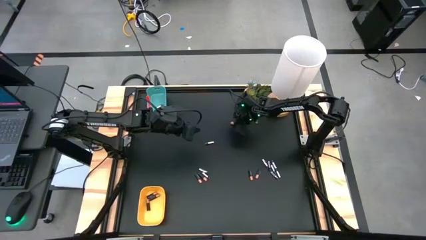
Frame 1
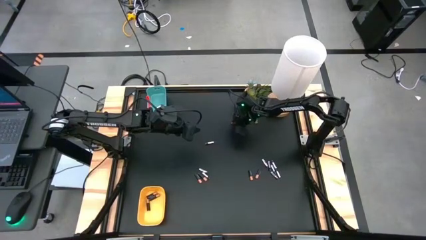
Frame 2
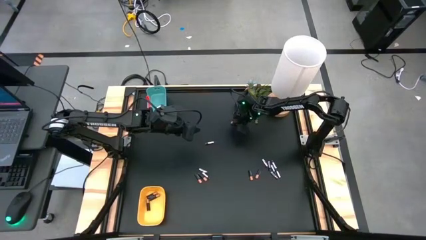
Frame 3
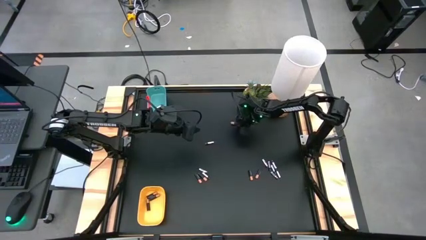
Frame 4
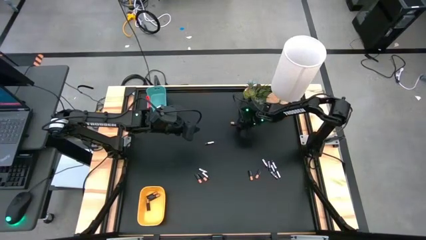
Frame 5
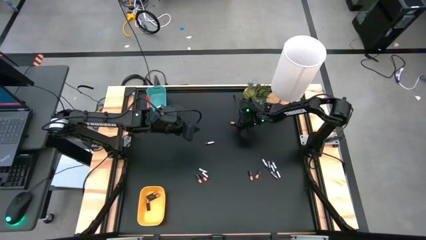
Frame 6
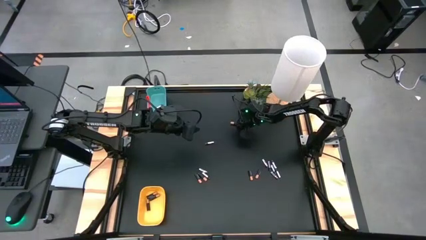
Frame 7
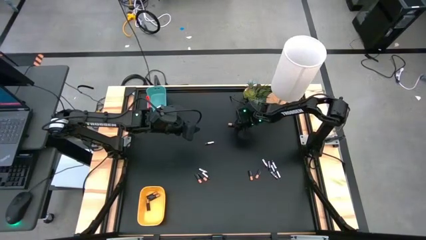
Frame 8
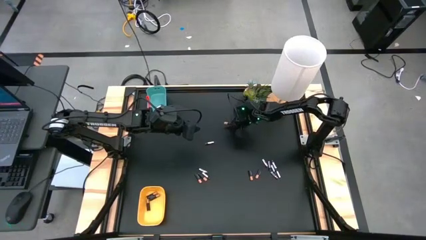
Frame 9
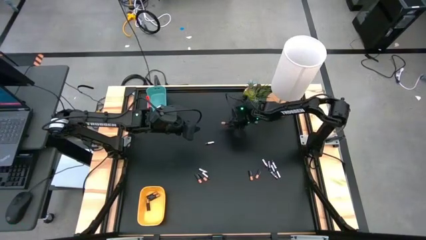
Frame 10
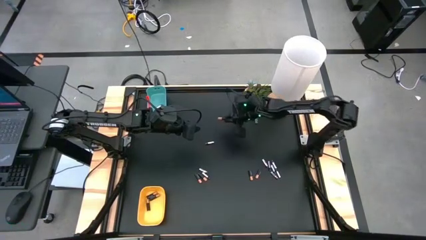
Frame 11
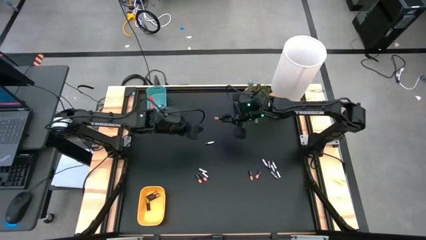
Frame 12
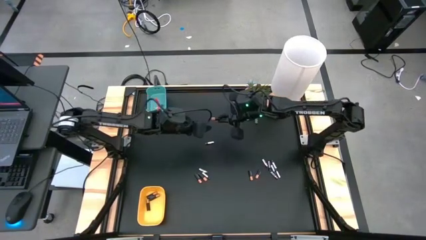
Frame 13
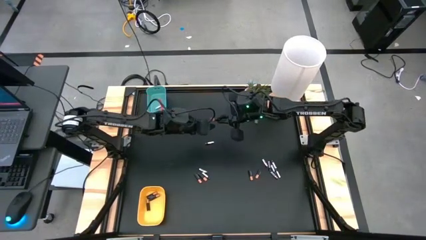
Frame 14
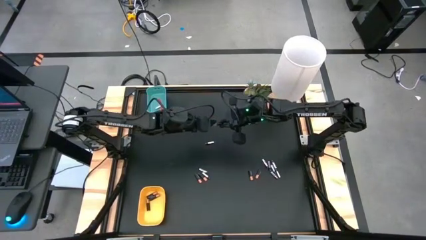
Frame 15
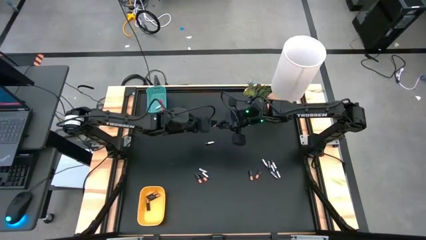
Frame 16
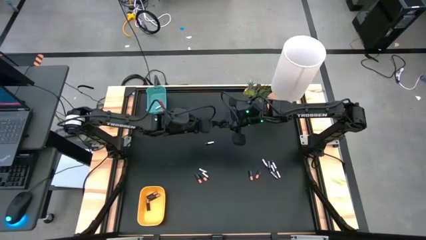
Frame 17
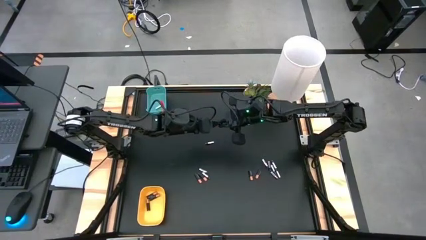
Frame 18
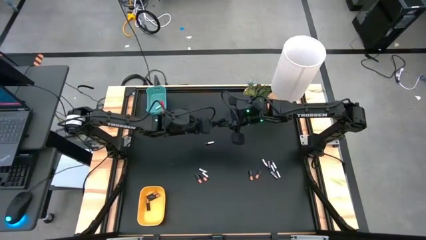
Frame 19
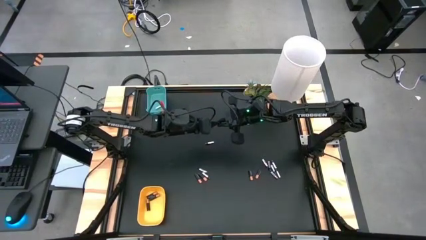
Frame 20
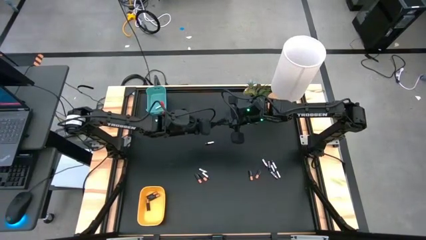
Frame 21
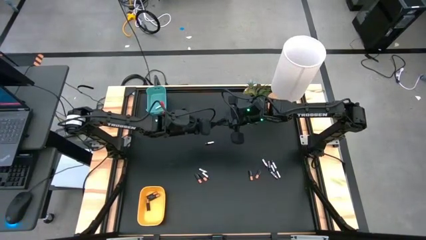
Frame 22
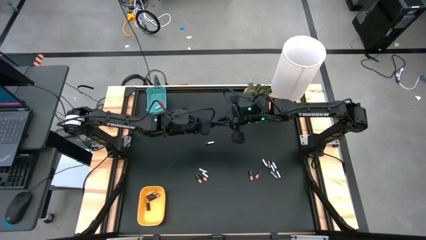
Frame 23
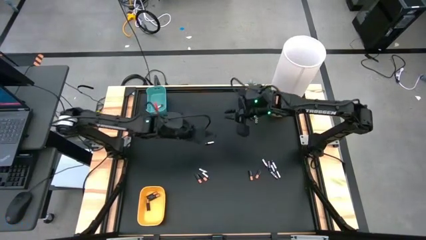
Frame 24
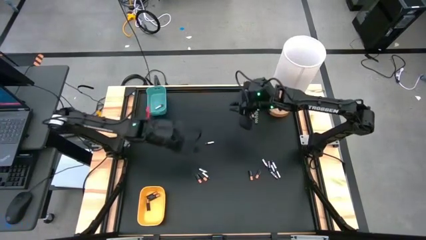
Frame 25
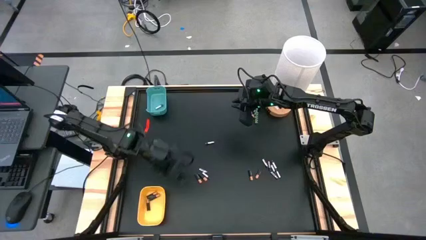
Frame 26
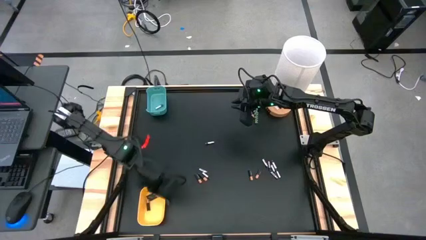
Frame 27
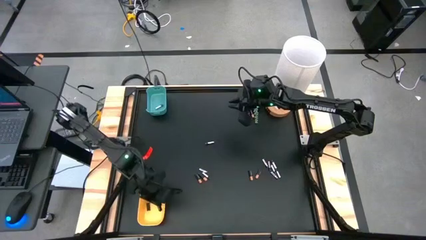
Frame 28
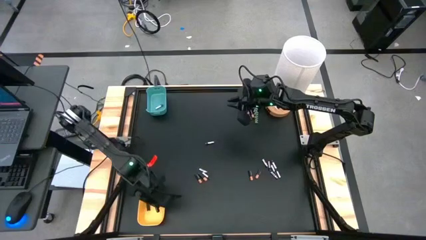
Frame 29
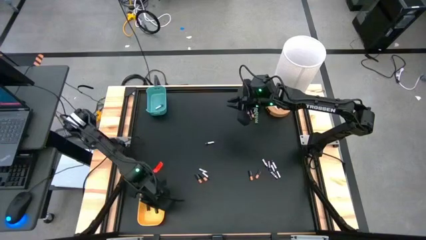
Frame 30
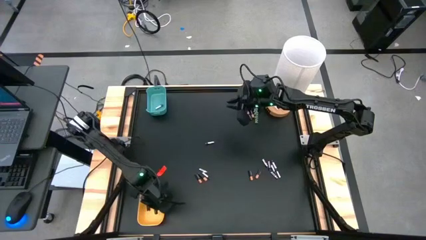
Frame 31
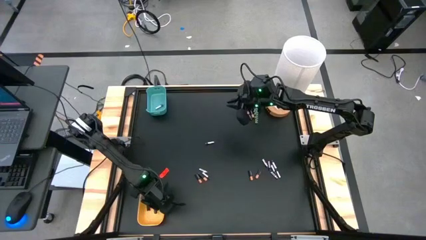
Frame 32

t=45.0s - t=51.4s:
Task: Sort batteries
Put the black battery into the yellow bin

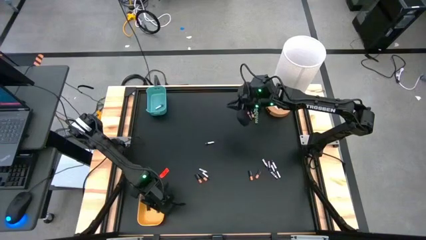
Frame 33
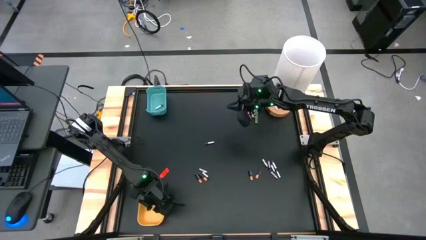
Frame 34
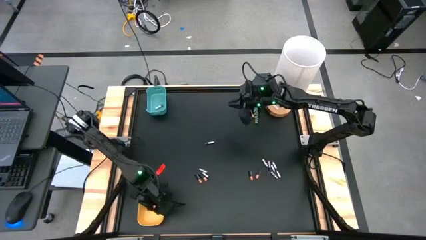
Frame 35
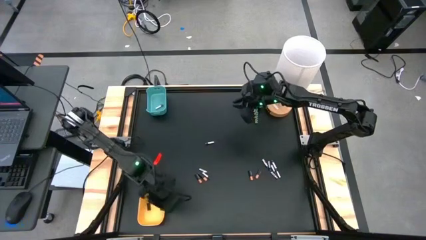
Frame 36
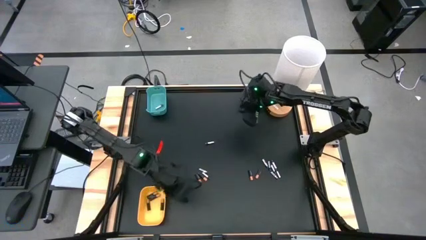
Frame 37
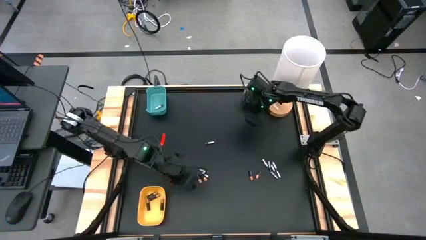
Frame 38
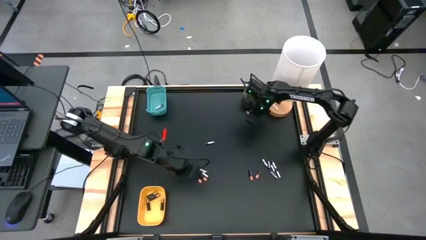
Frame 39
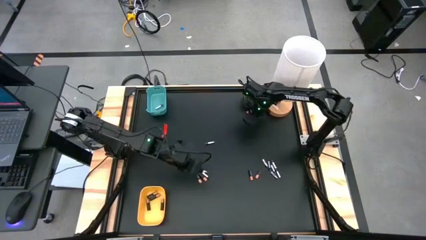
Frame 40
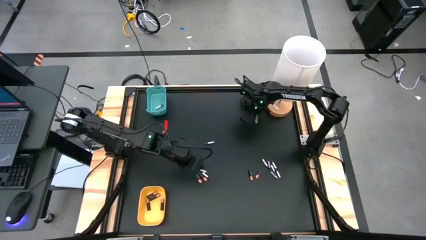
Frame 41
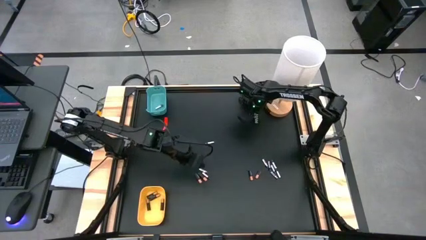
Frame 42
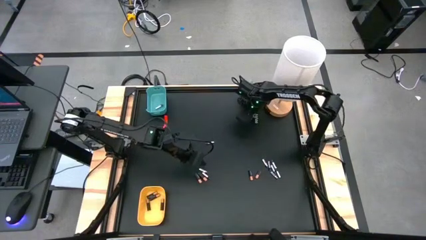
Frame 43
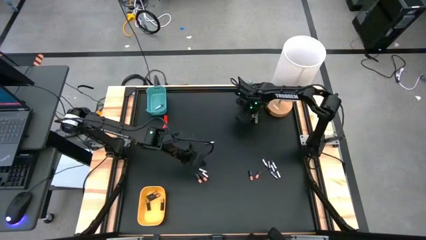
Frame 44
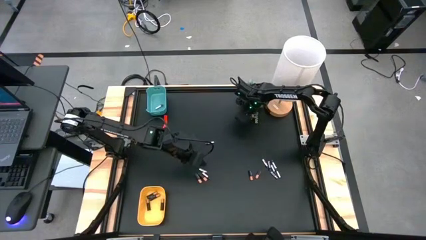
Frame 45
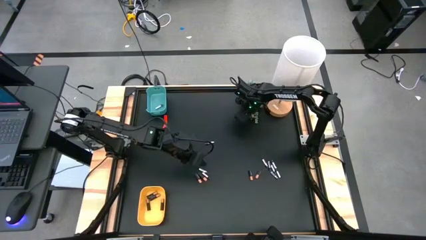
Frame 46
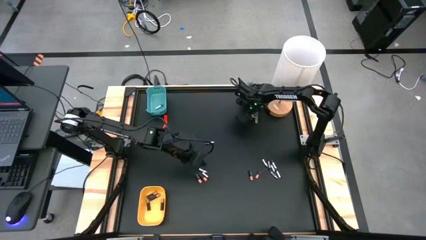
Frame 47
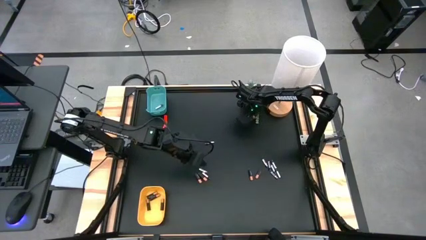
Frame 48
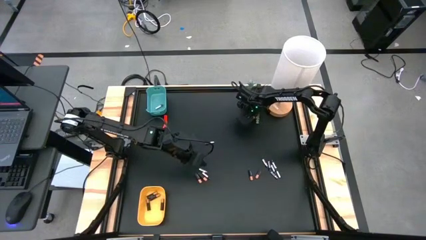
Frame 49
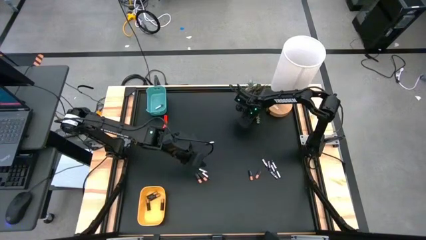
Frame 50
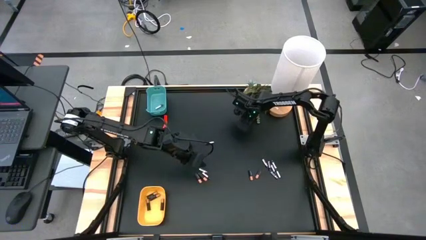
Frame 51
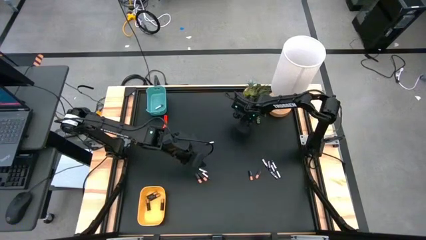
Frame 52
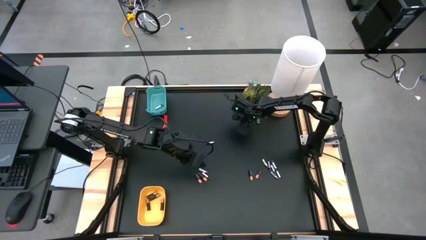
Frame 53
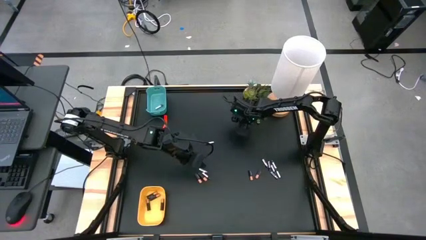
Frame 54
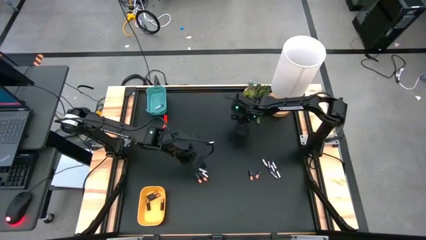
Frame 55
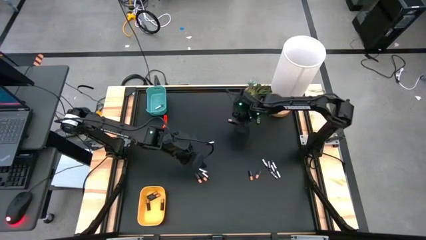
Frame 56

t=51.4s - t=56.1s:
Put the black battery into the yellow bin

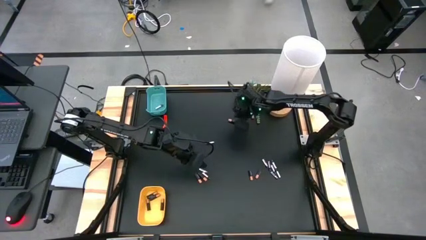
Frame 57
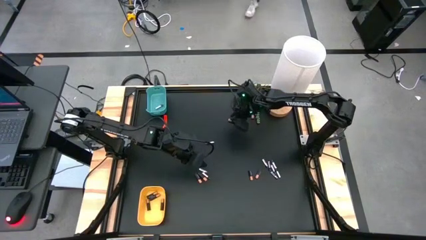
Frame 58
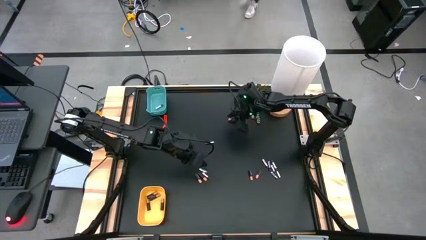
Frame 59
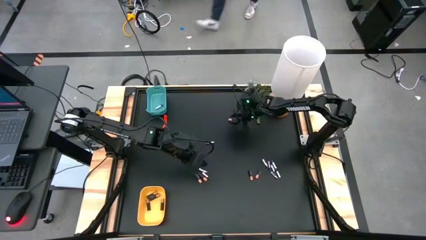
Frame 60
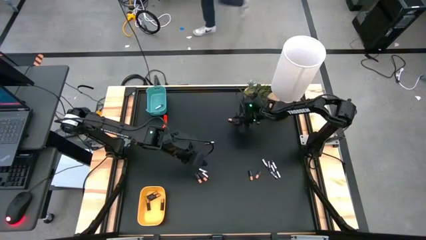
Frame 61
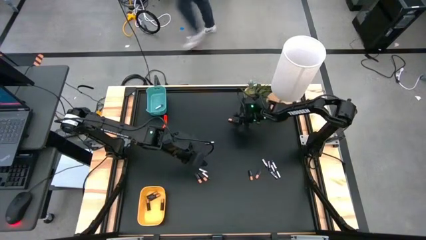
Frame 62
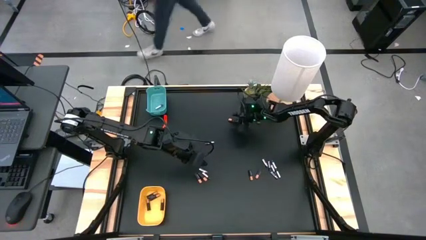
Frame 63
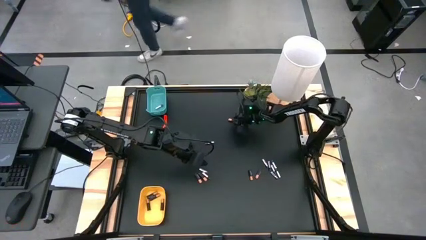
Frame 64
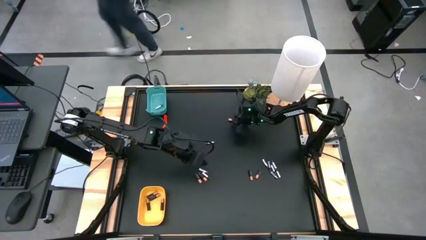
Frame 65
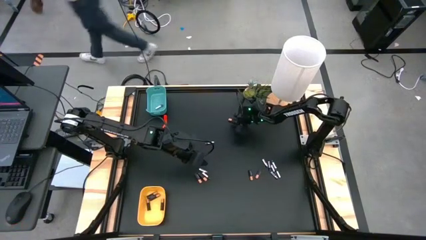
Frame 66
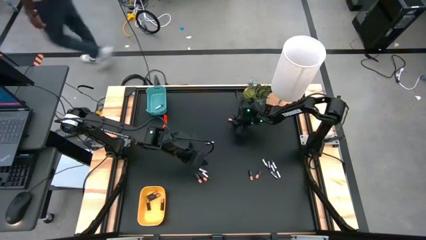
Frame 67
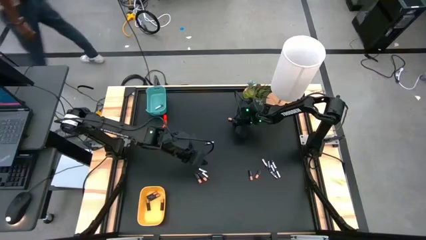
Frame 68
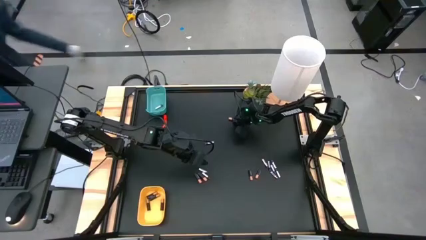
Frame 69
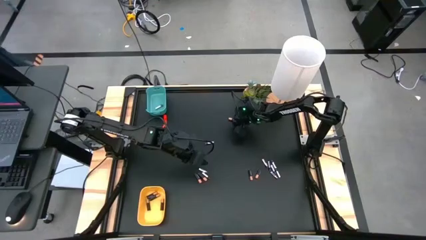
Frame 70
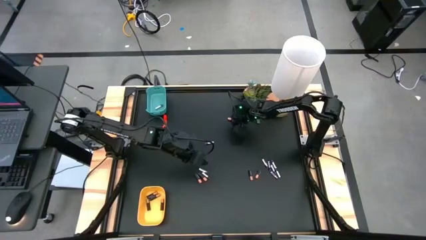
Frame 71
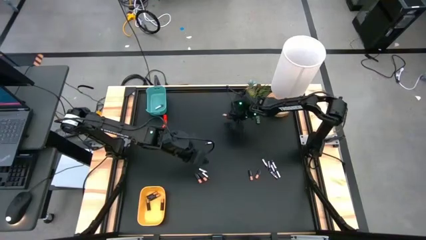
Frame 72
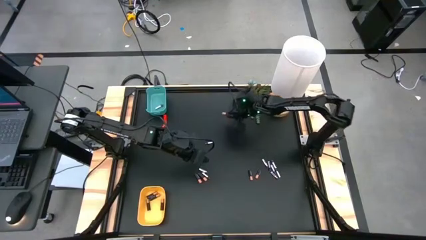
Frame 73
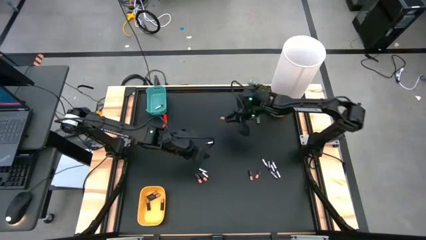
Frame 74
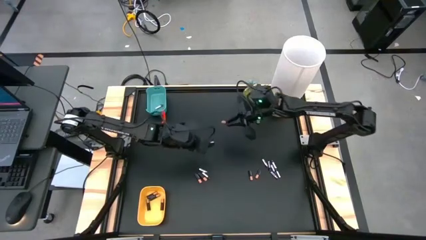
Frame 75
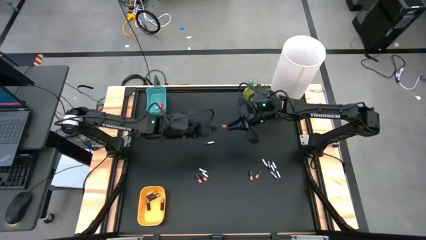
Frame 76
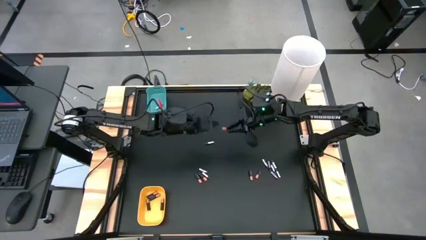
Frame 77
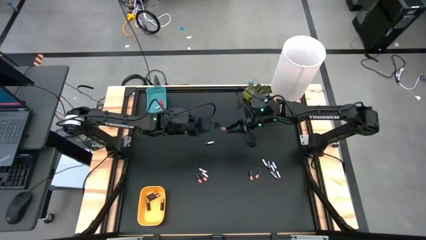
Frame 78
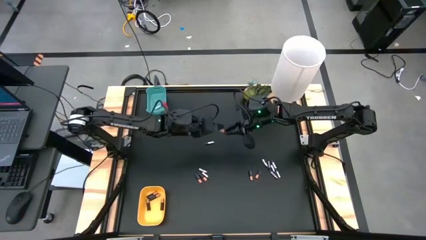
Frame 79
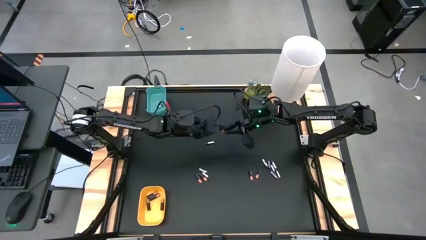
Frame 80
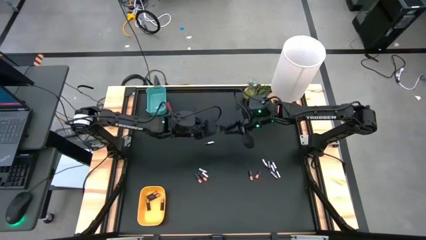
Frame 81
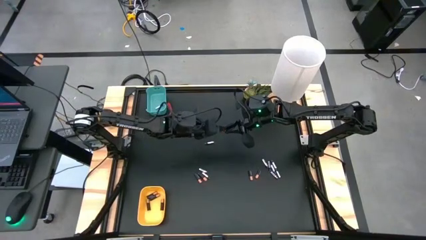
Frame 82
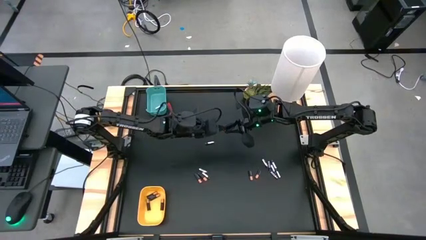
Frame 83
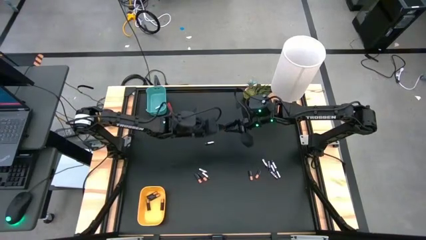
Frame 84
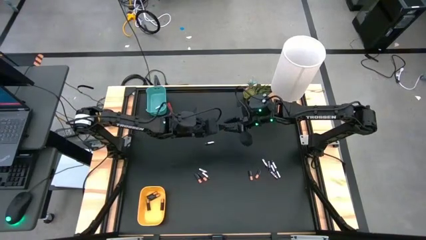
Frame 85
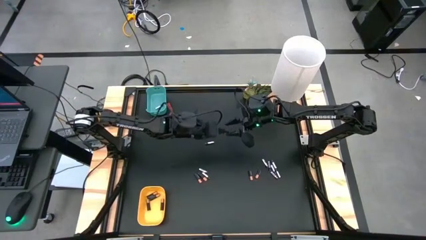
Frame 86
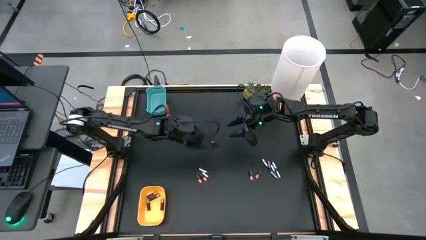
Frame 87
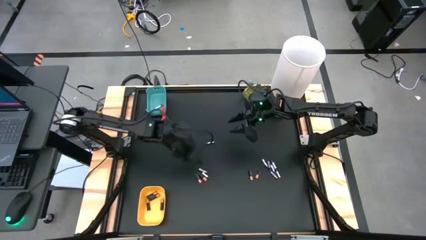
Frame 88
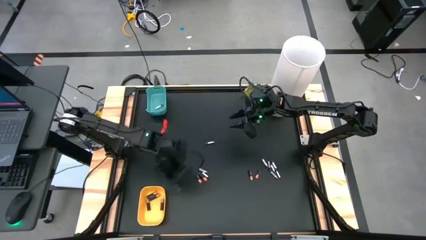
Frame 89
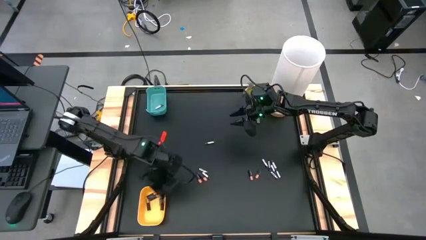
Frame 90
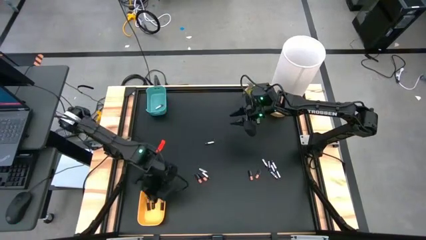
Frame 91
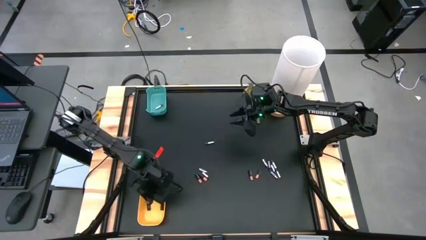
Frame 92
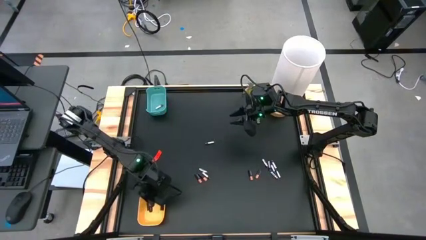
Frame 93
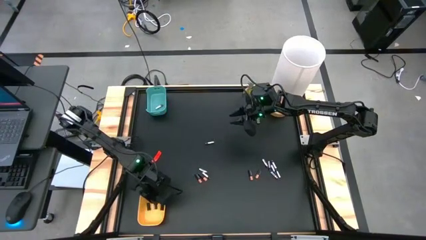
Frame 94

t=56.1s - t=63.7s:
Put the black battery into the yellow bin
